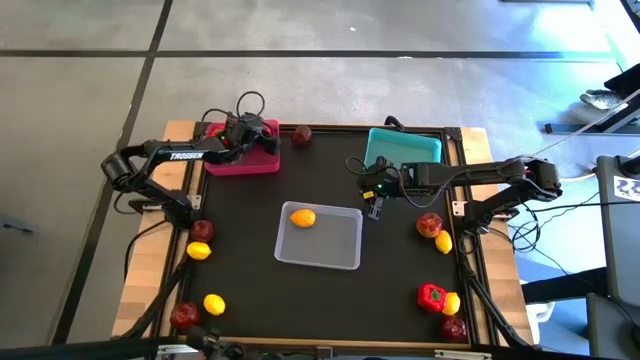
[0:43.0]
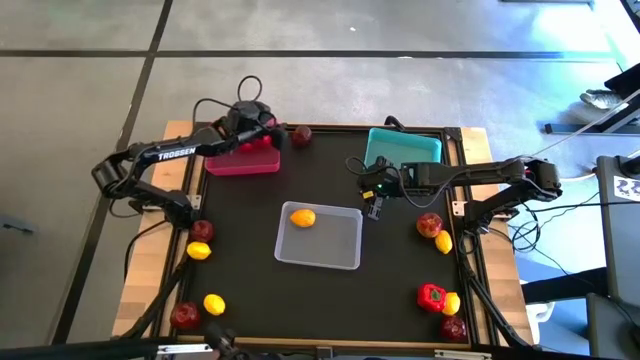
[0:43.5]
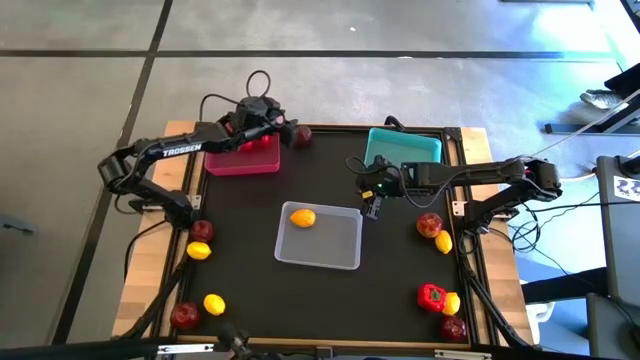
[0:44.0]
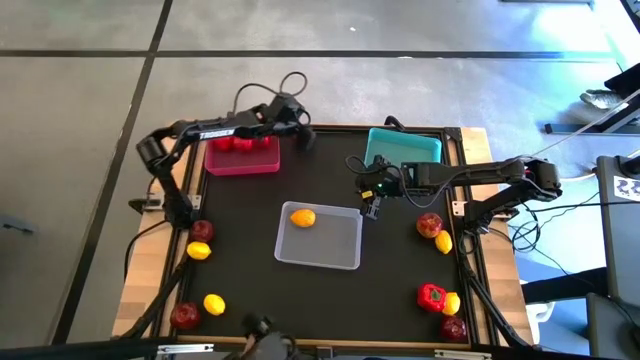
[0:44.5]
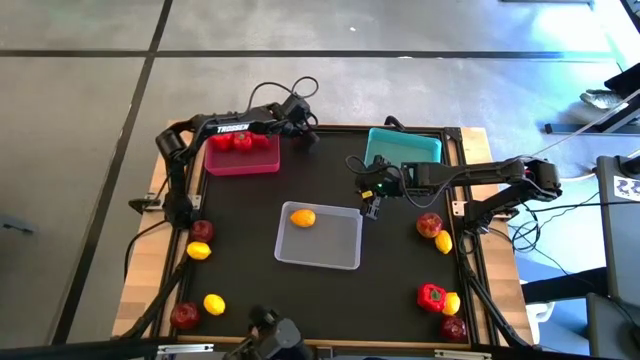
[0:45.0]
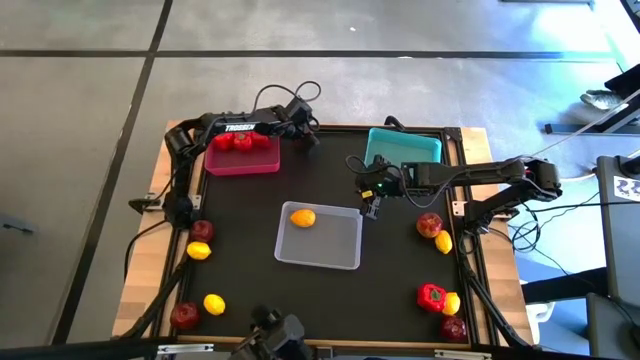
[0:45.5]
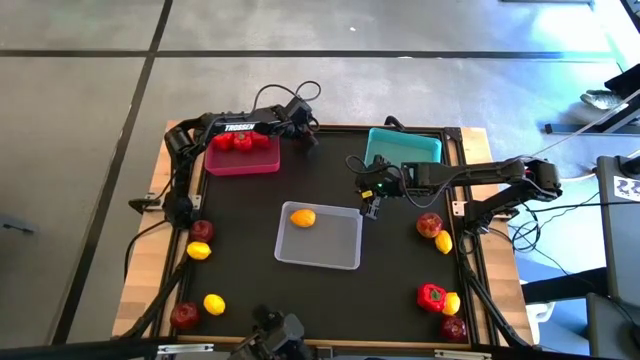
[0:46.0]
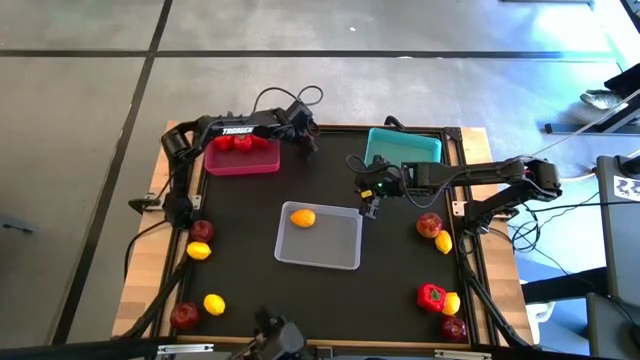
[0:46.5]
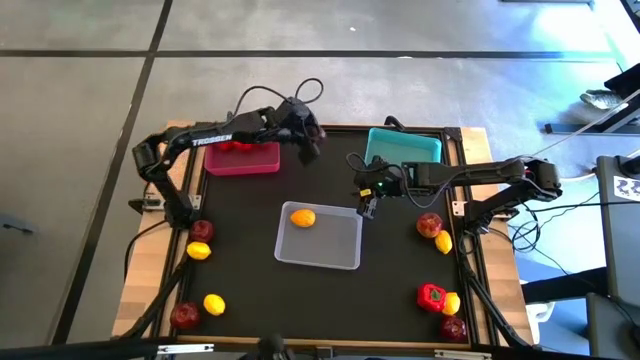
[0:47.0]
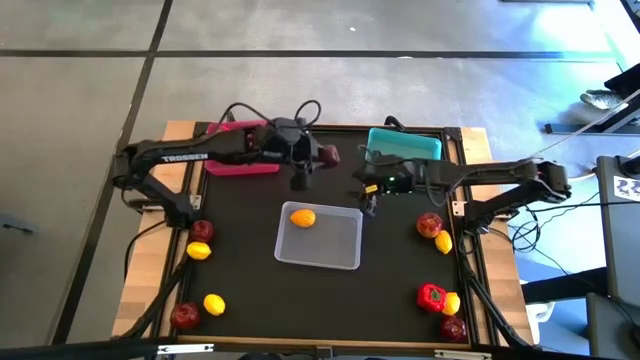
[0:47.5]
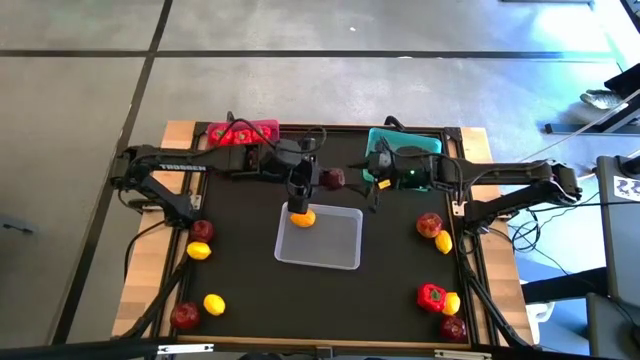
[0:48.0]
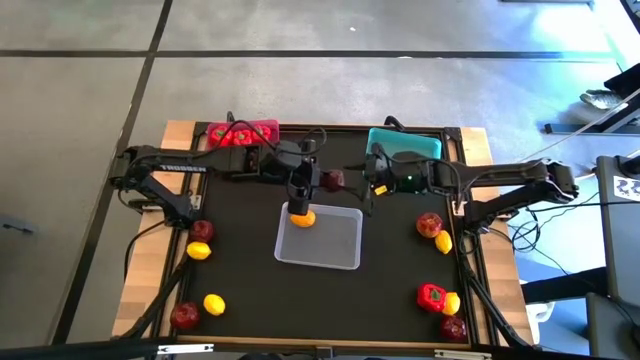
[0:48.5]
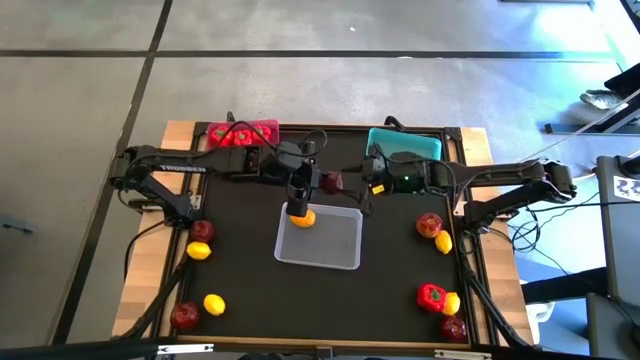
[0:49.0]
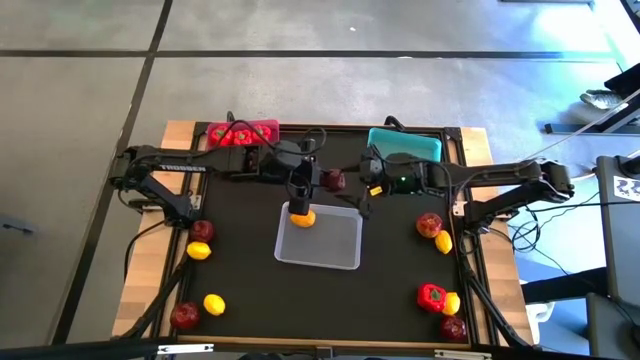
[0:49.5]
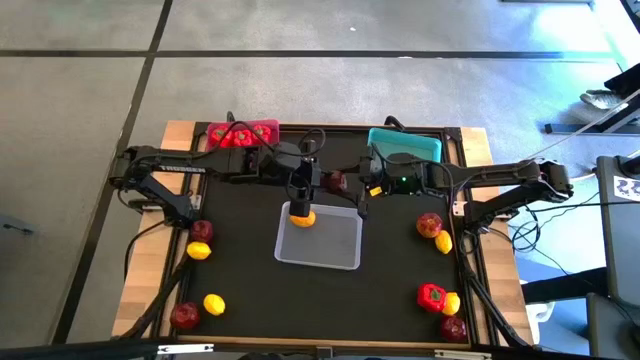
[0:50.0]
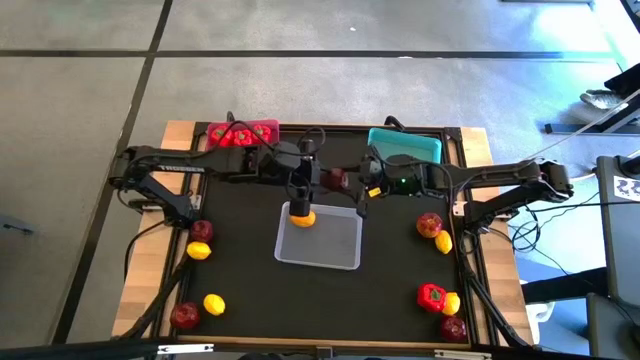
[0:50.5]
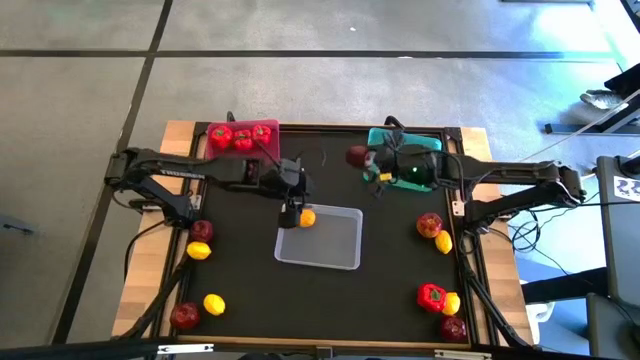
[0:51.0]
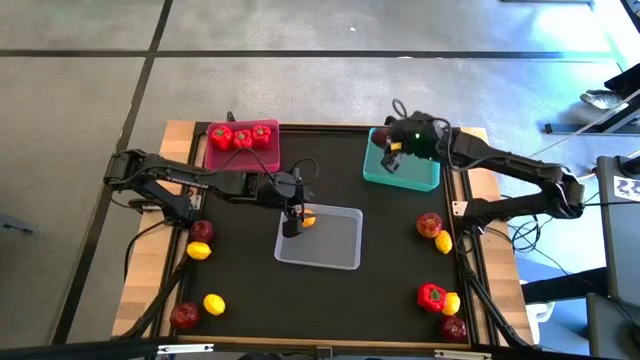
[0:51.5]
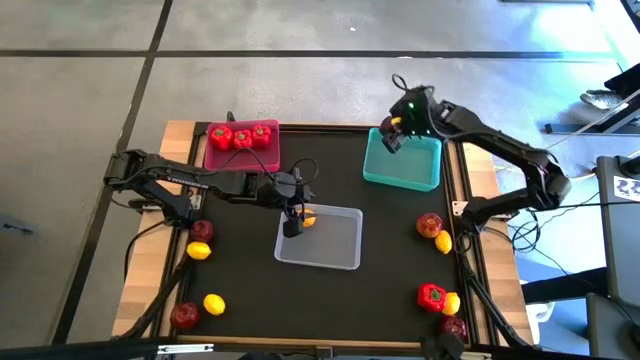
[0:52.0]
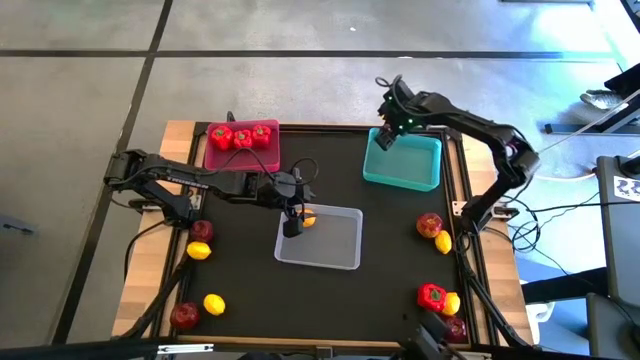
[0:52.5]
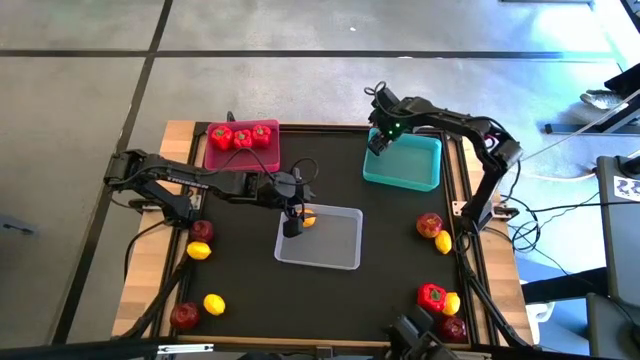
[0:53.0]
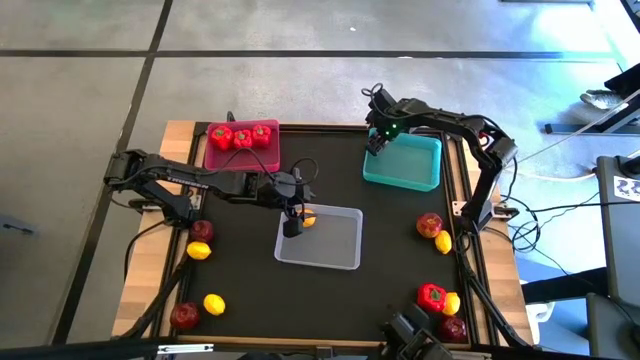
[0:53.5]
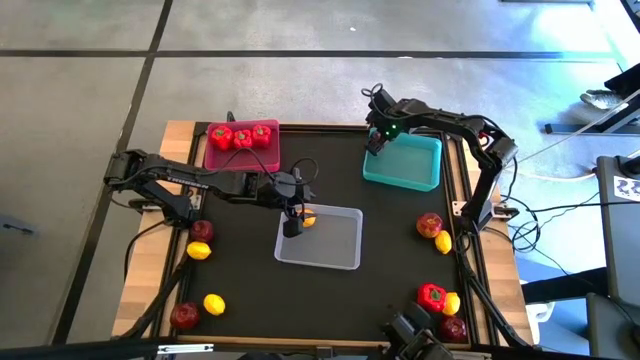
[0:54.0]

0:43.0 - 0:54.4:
Task: Sort produce into baskets
Put the apple into the blue bin

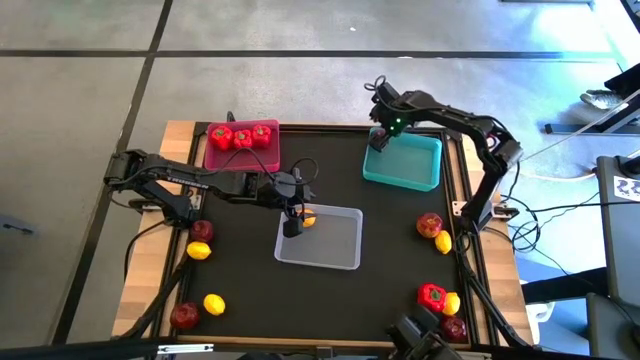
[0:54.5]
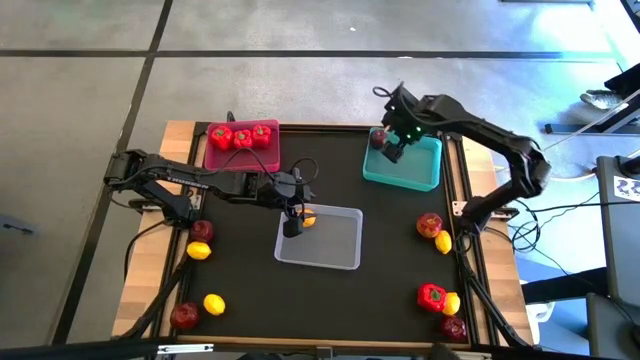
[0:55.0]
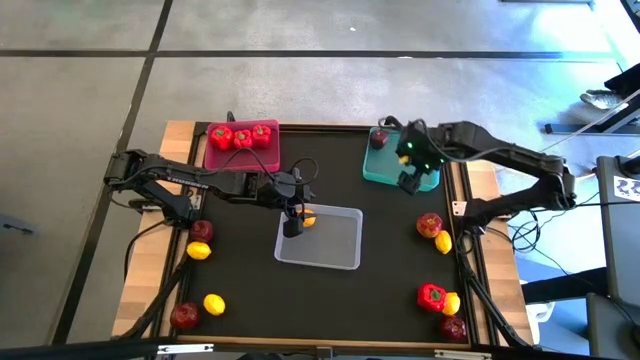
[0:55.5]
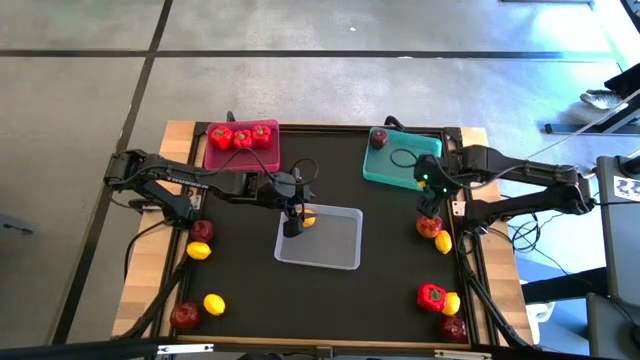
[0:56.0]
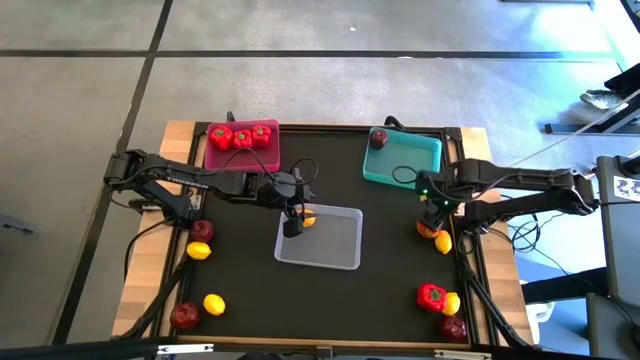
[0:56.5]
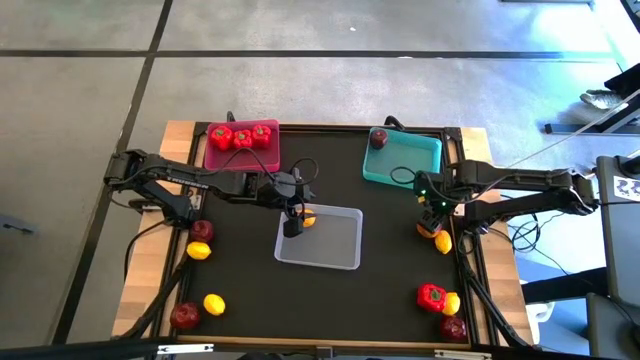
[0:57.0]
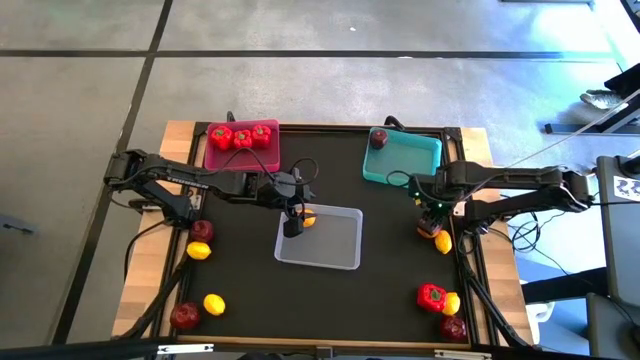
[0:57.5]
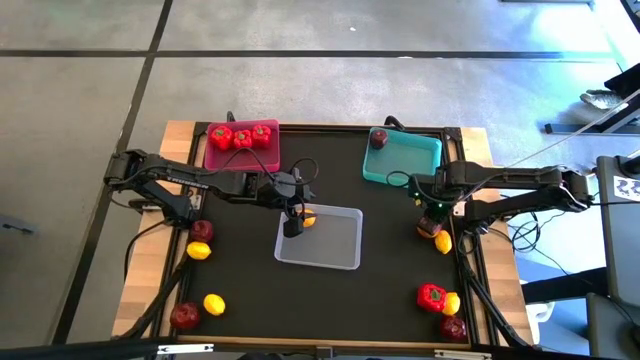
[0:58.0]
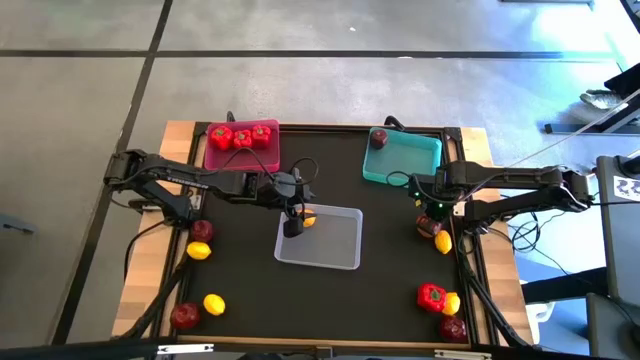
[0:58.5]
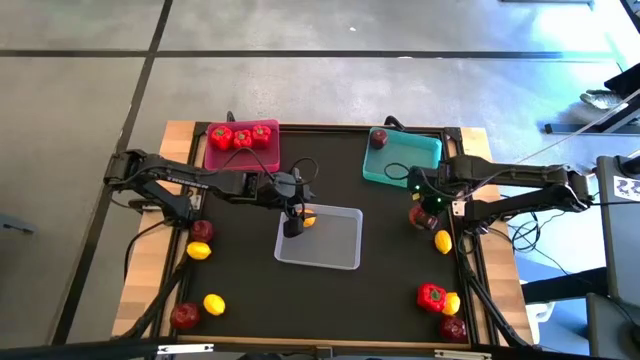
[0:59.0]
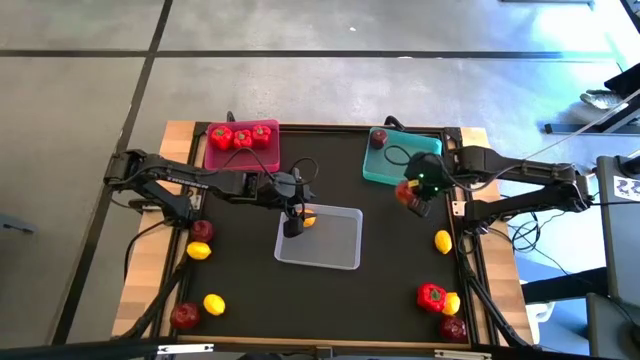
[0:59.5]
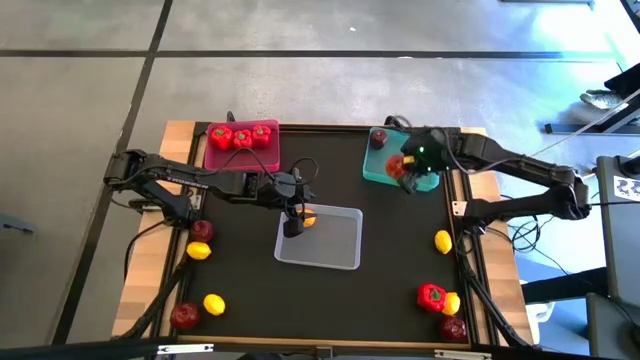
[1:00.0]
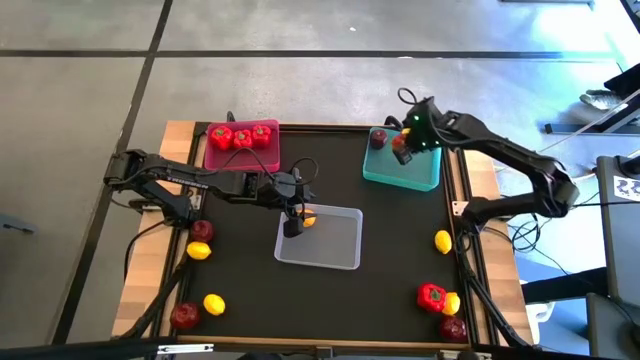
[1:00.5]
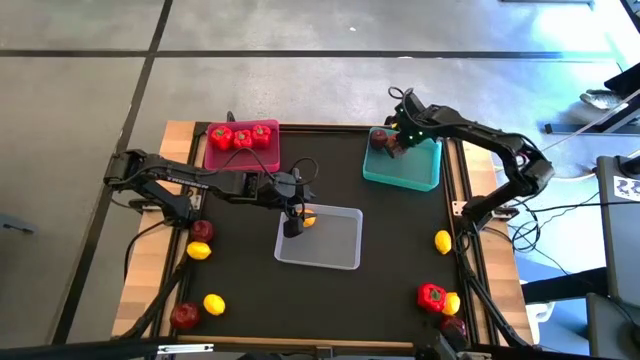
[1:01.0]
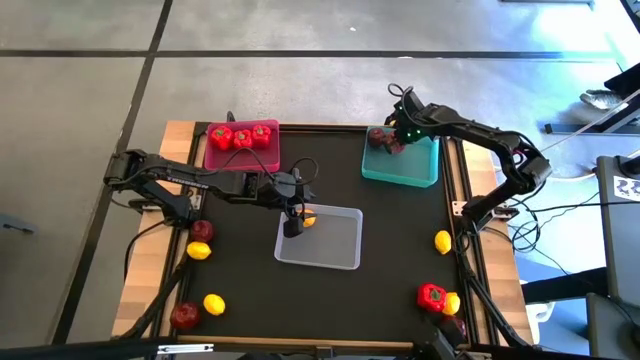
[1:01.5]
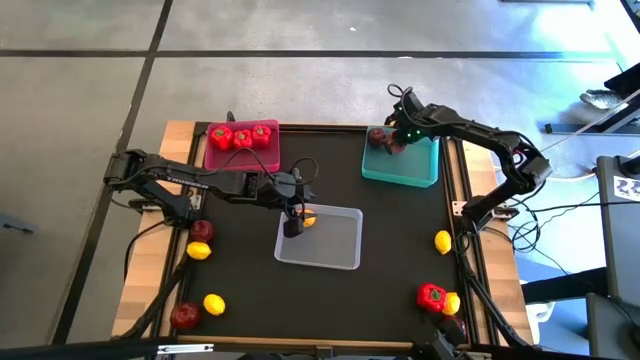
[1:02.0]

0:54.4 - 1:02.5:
Put the apple into the blue bin

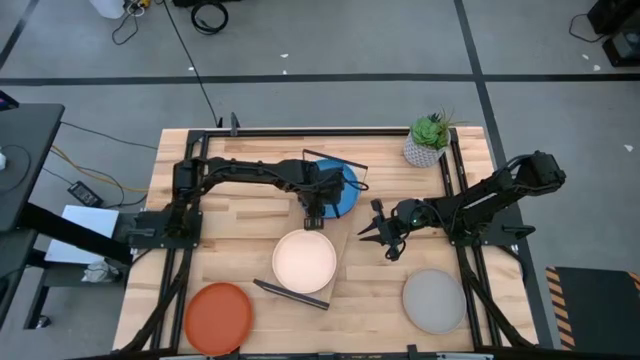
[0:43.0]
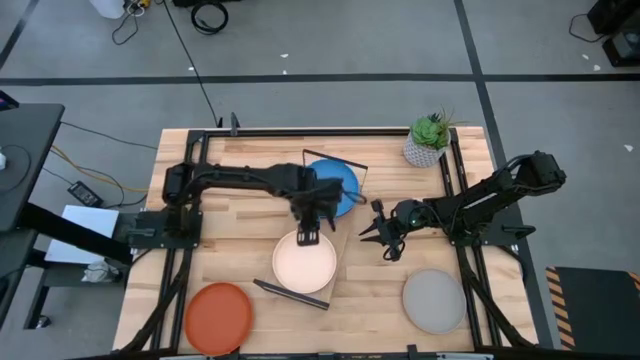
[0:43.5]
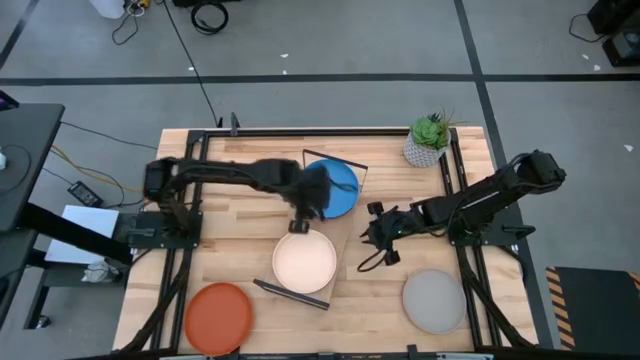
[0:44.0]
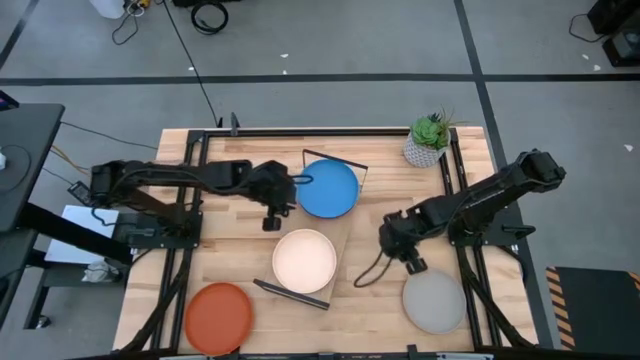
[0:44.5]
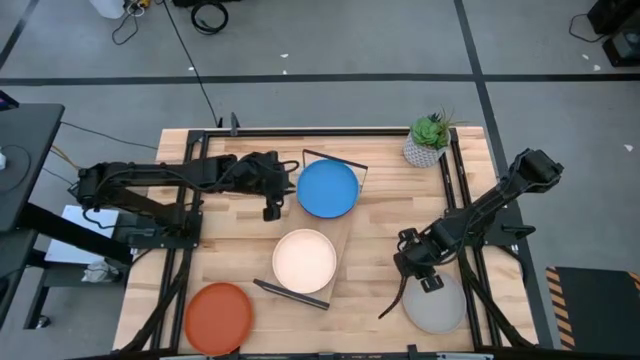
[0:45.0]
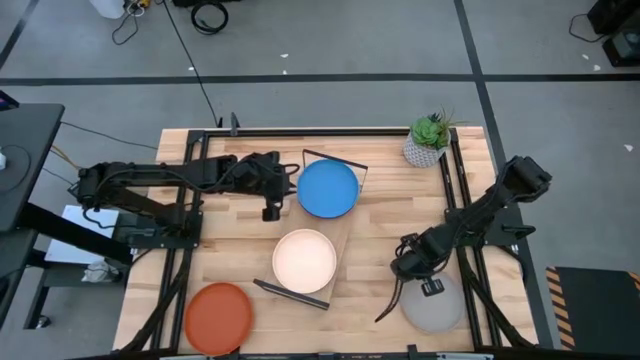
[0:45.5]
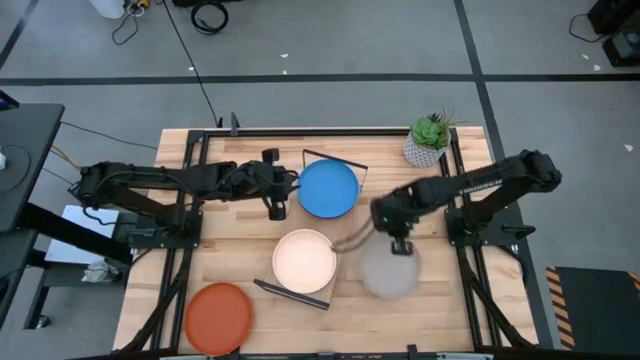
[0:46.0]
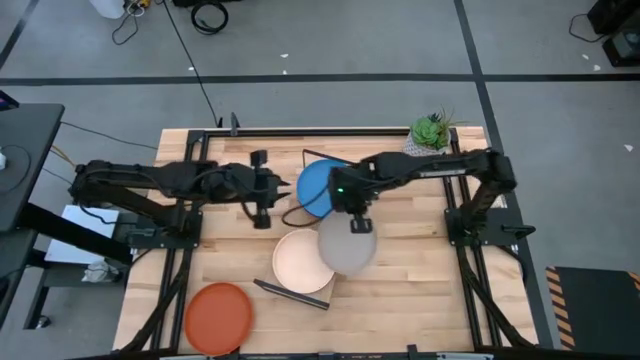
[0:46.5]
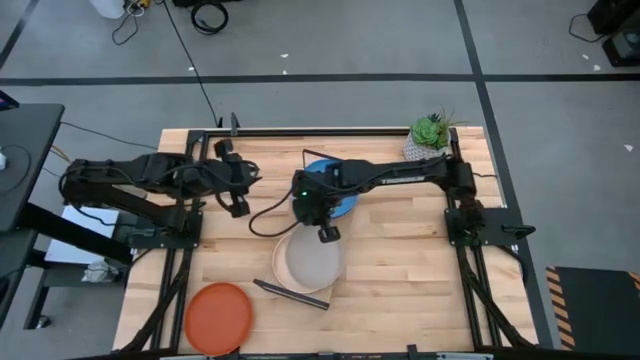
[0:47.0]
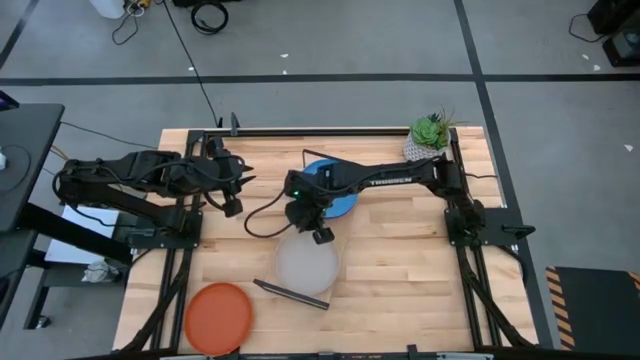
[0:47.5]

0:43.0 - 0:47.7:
Task: Place and stack plates onto a shelf
Stack the gray plate on top of the white plate on the shelf
